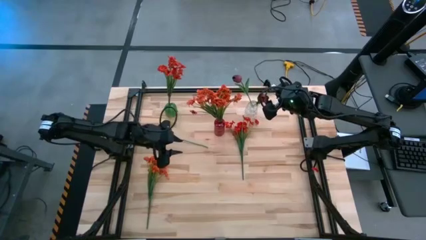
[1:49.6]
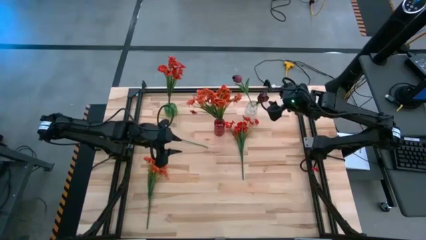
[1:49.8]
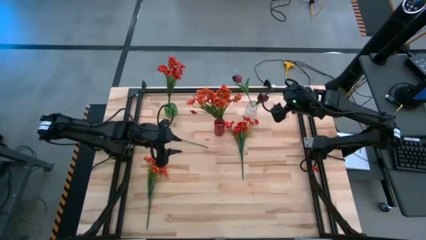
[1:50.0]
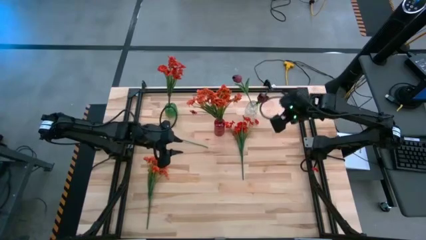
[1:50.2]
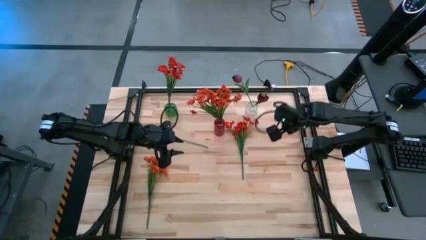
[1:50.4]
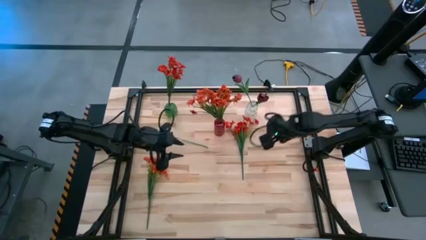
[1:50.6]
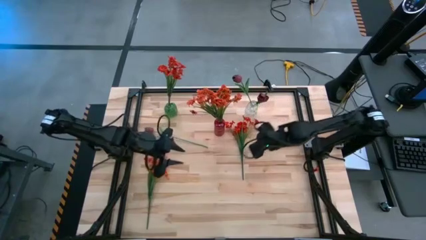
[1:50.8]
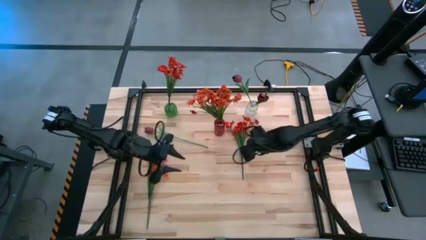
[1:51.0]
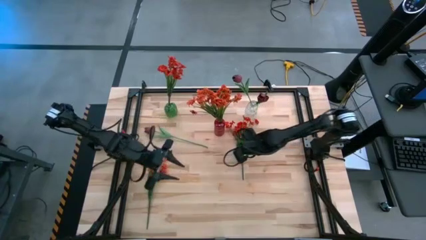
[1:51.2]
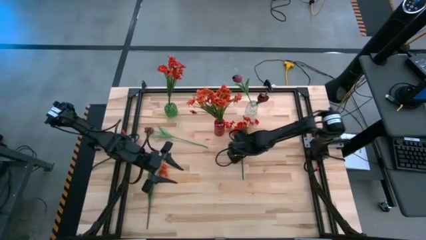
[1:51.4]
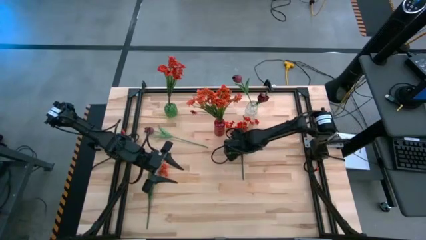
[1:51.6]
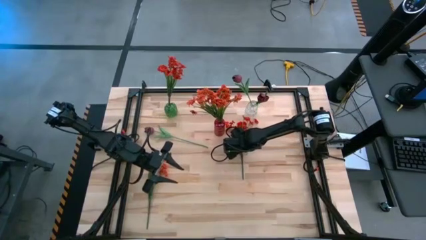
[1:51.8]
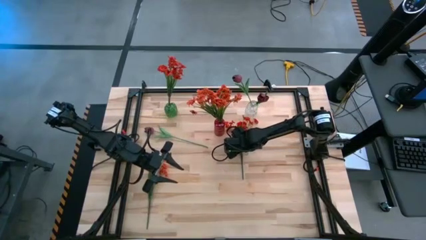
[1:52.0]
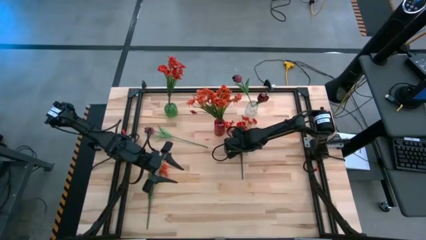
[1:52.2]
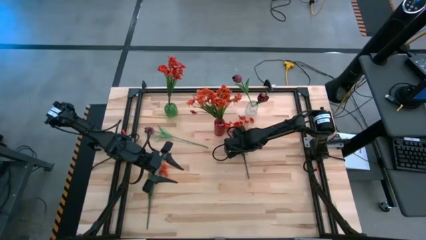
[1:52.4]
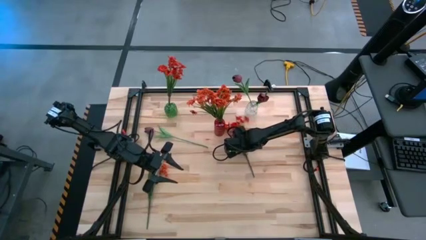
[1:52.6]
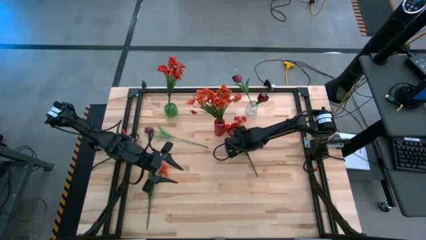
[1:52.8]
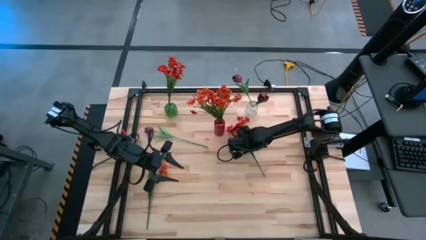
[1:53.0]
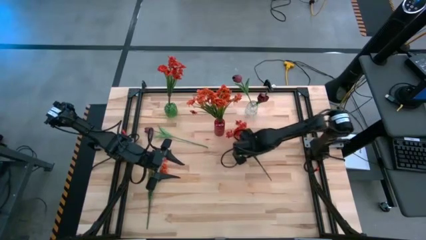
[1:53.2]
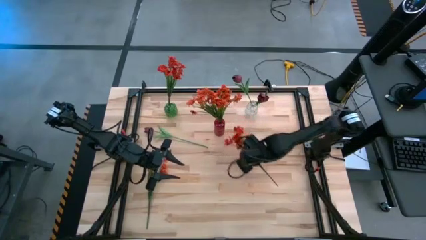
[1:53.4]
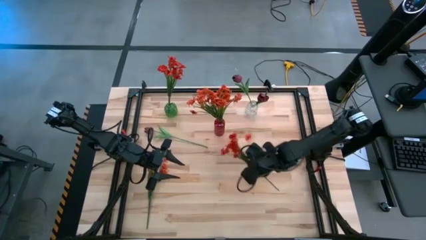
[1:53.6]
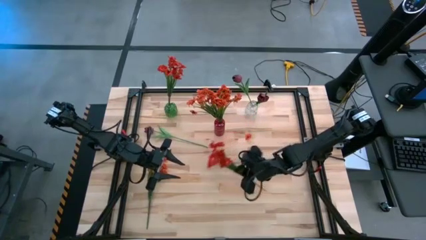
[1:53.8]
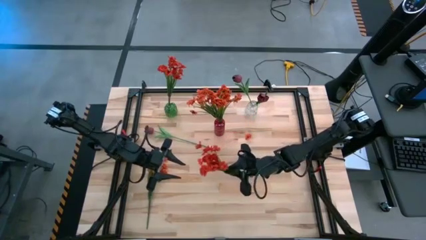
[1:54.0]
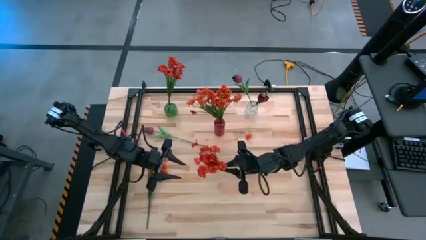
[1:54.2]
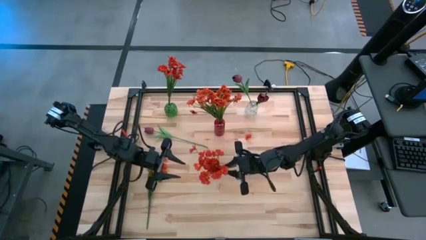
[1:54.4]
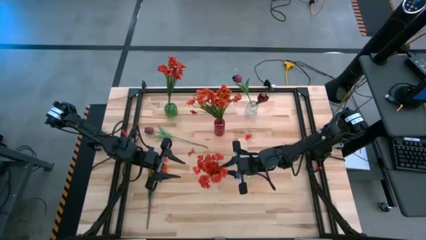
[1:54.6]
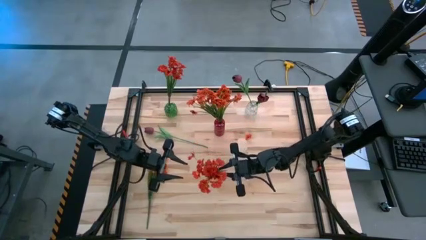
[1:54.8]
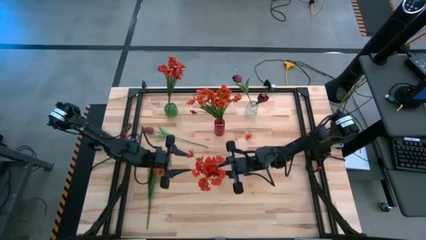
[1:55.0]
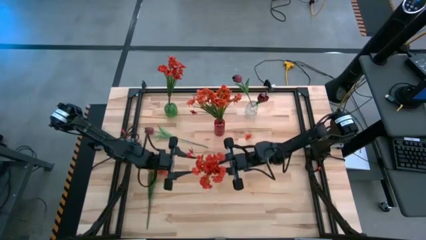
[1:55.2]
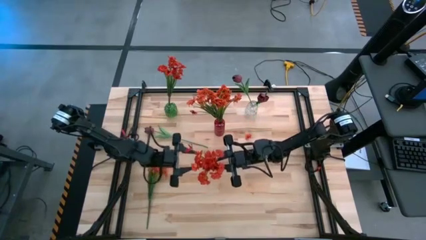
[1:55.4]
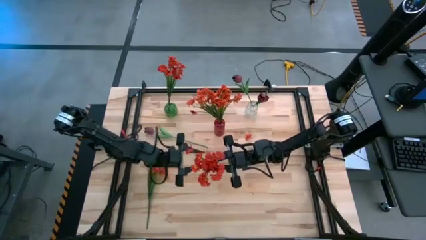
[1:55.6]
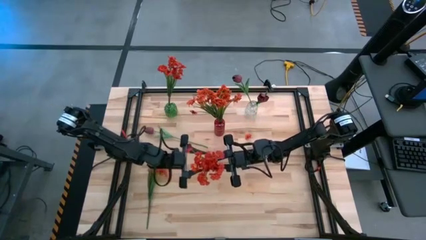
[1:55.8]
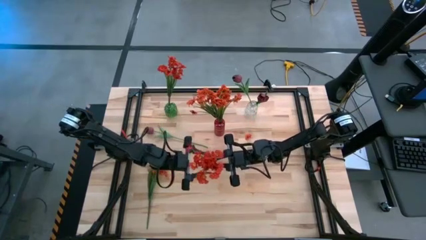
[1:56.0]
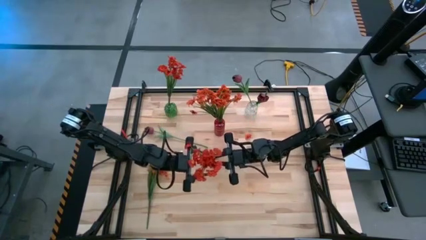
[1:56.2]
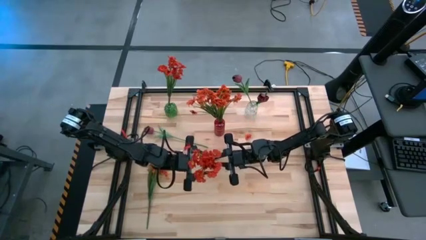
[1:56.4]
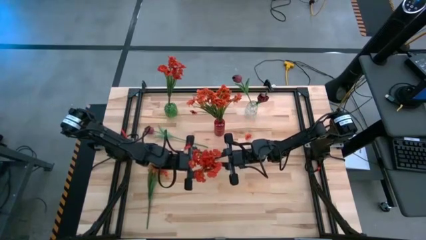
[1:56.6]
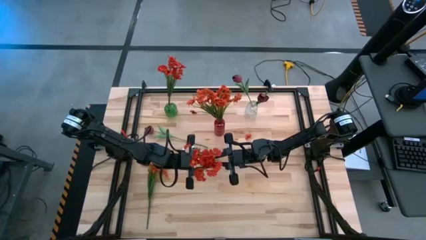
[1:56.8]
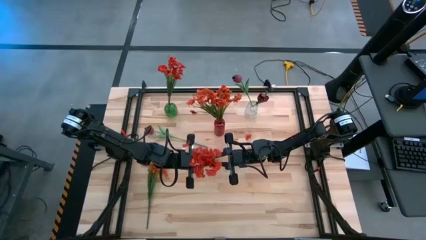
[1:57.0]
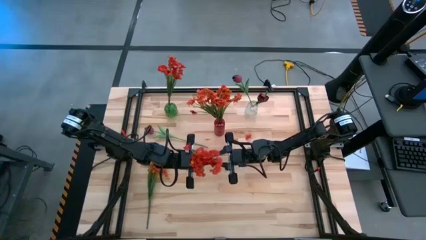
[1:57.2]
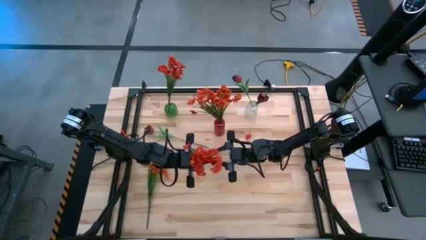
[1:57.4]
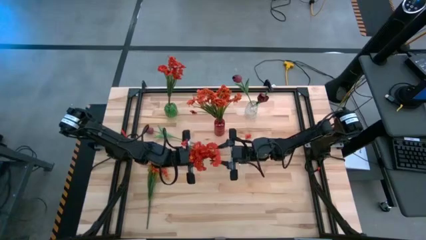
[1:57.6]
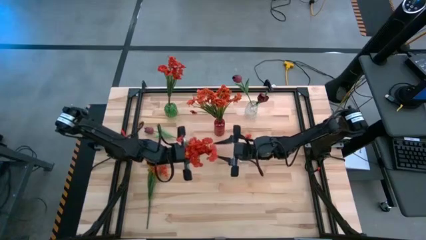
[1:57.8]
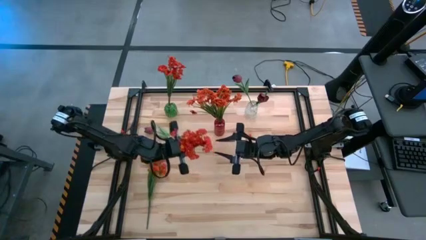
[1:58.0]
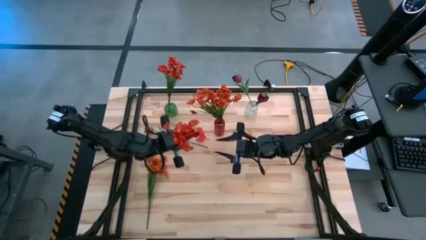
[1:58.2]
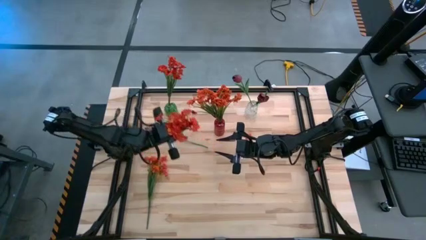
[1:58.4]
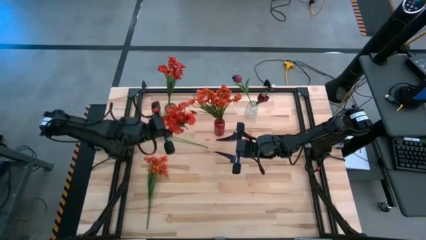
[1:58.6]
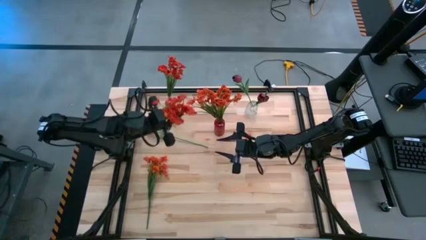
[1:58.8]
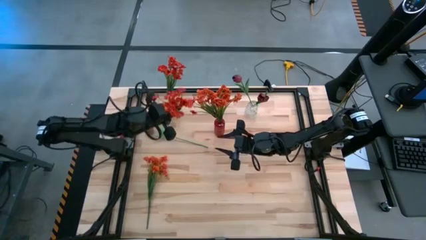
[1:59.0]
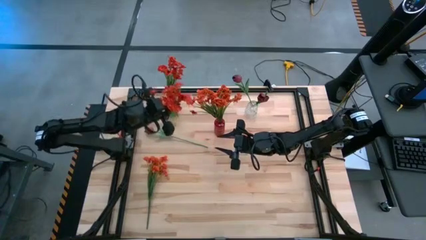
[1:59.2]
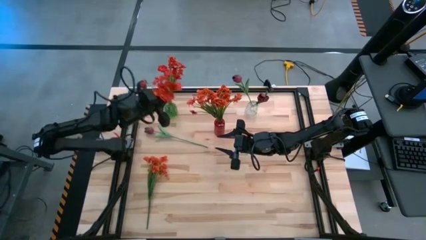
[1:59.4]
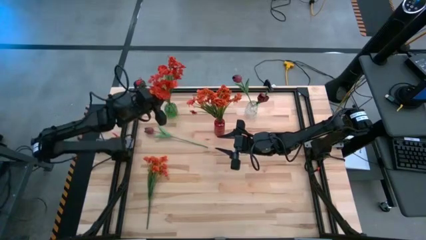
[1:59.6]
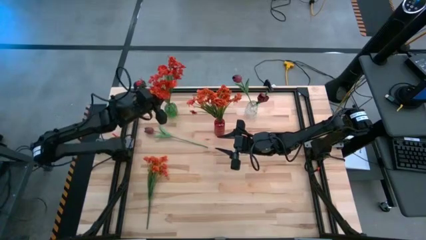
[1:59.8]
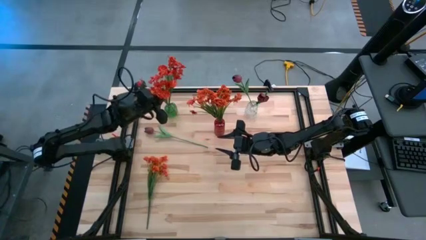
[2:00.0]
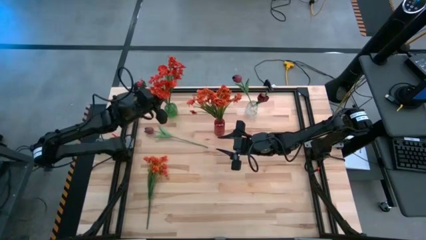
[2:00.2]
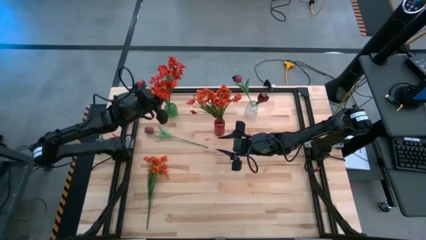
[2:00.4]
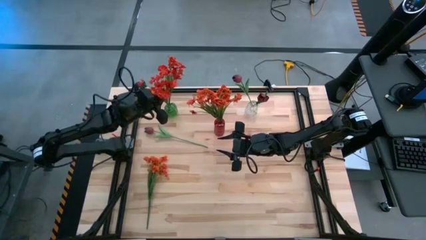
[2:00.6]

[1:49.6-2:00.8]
Task: Sort flowers into vase by color
Put the red flowers into the green vase

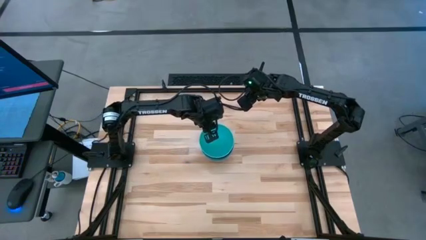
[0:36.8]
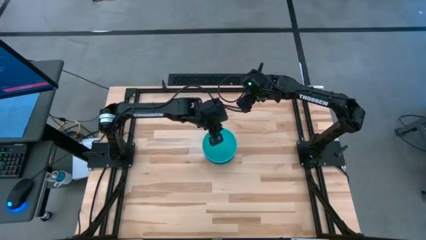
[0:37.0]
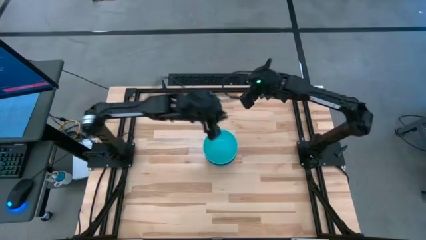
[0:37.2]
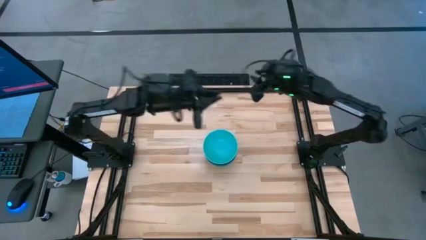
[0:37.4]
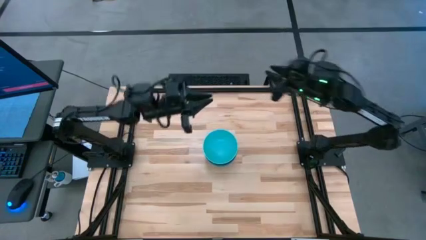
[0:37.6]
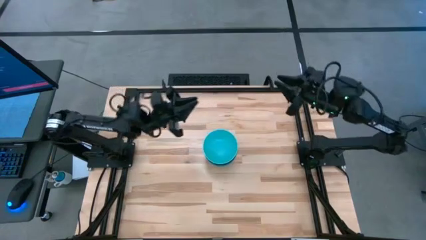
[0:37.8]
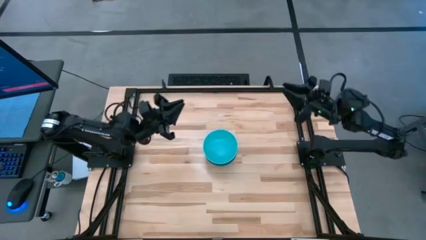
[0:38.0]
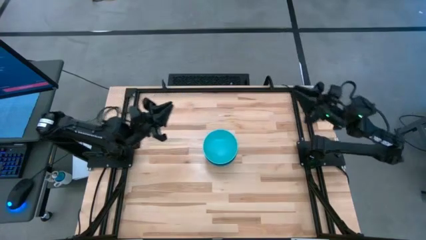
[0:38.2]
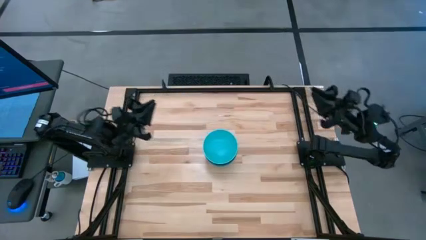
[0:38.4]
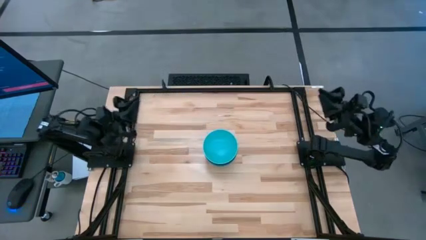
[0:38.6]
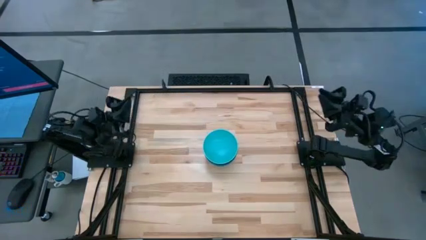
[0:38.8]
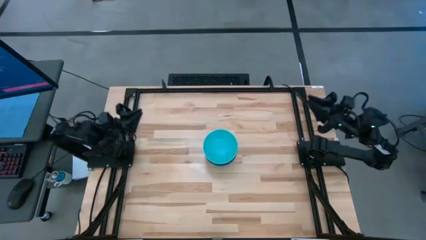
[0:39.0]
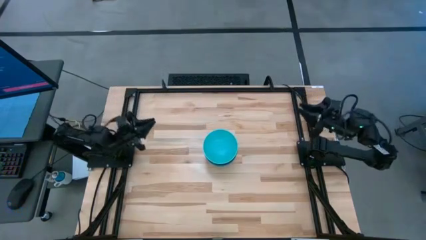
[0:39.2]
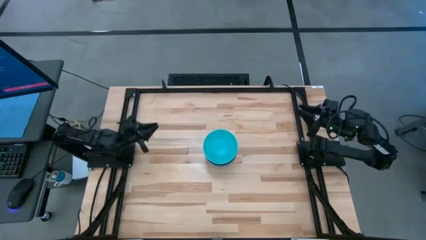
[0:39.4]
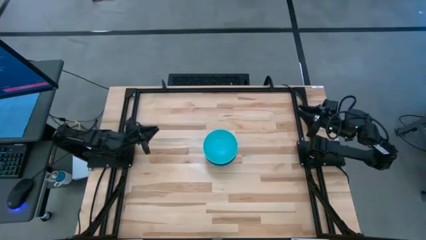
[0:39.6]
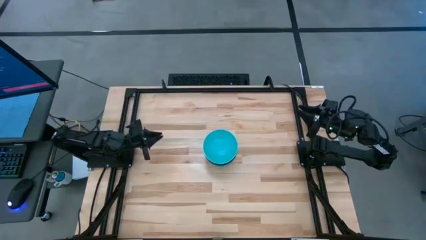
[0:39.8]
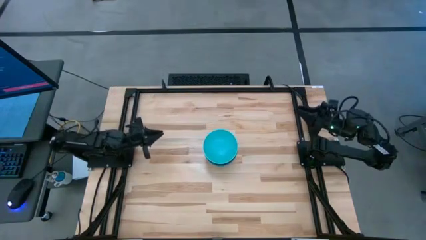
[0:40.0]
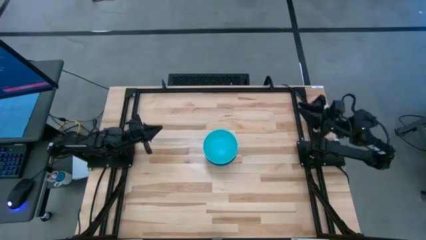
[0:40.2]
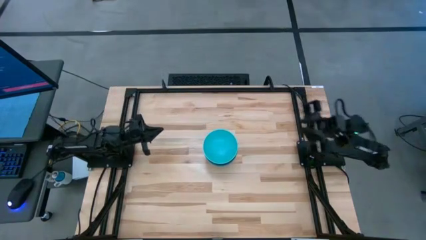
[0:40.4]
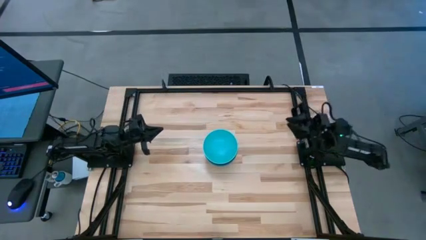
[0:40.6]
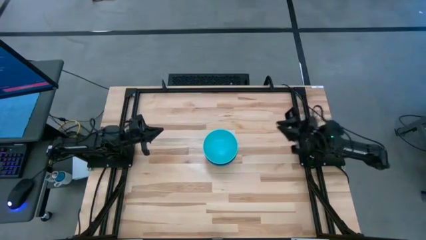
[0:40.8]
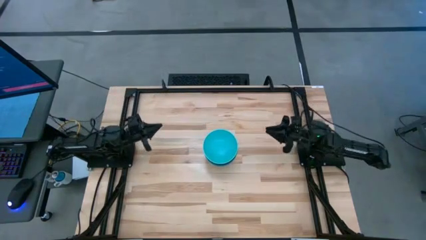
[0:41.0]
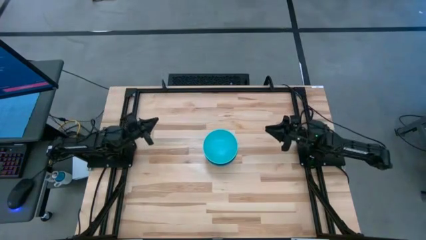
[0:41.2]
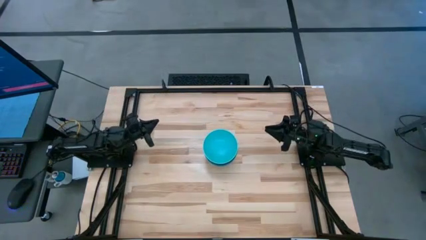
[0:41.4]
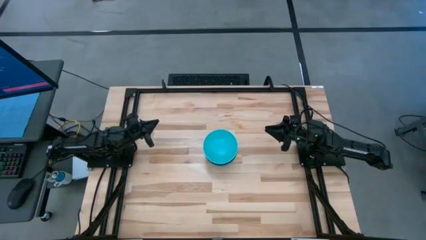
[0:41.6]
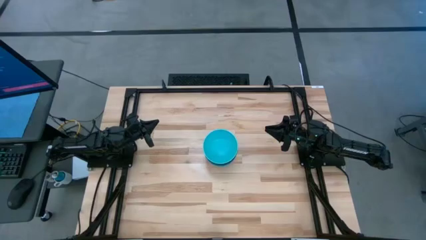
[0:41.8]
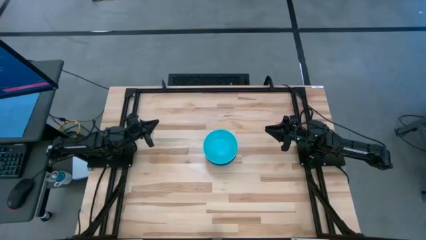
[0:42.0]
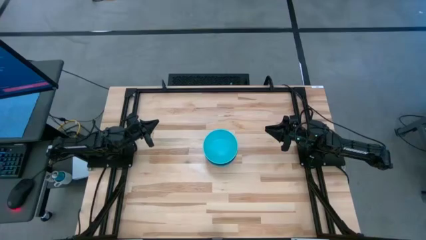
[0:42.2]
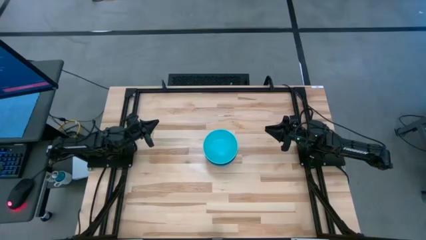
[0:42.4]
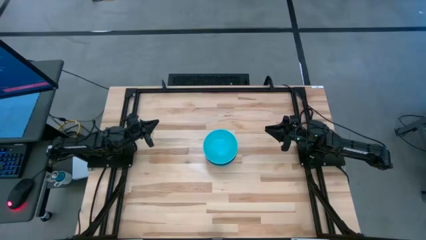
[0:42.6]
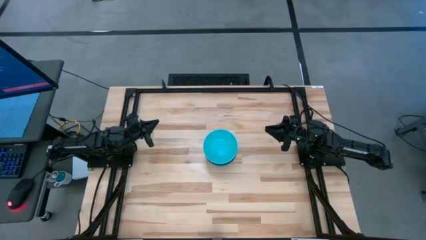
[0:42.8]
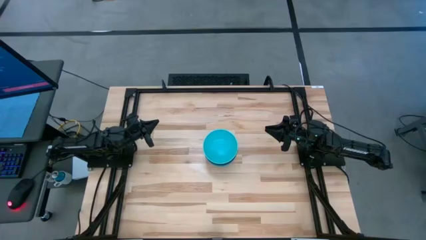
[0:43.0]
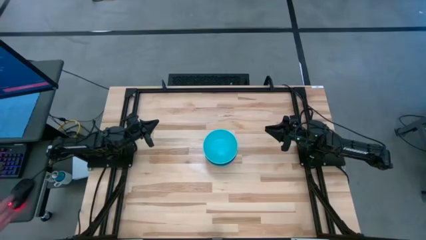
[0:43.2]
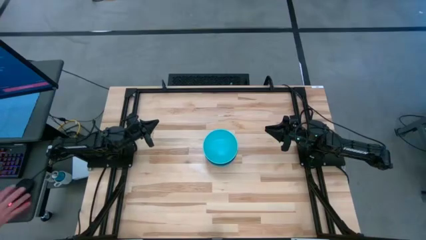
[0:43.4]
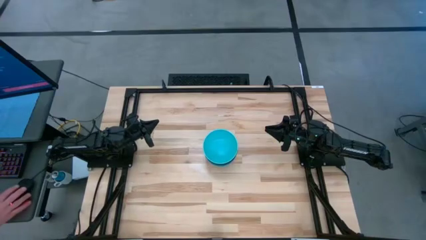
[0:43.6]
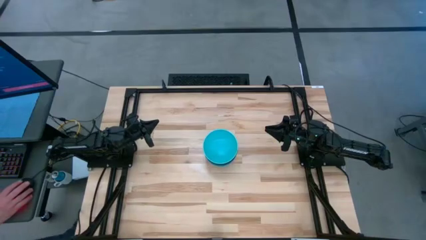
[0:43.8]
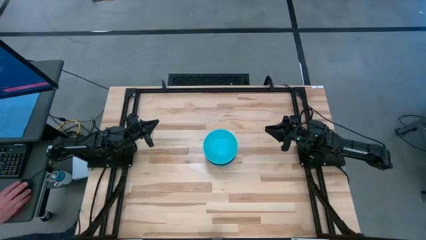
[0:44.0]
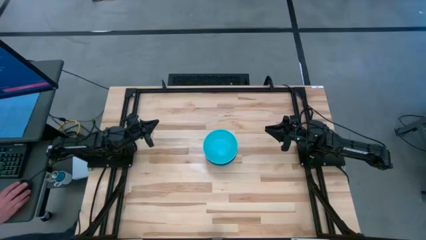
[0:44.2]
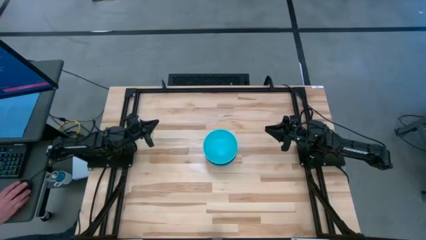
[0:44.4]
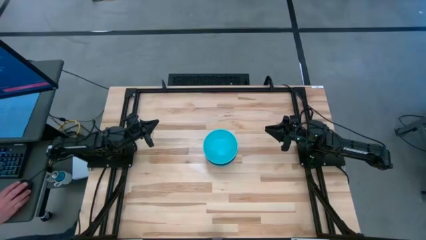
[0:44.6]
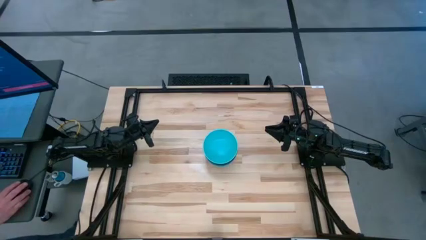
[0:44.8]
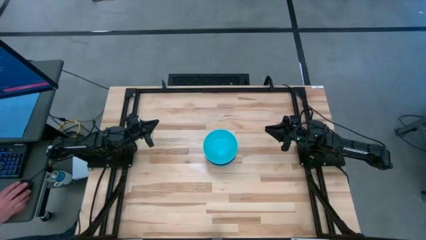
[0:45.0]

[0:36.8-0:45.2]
Task: Nest bowls inside each other
Return to Home Position
